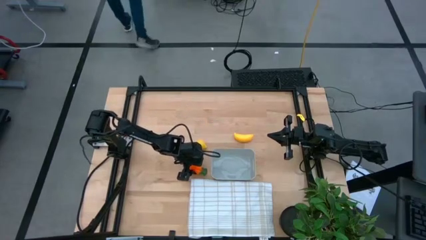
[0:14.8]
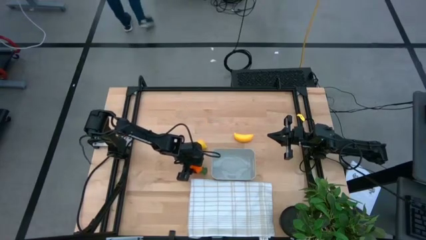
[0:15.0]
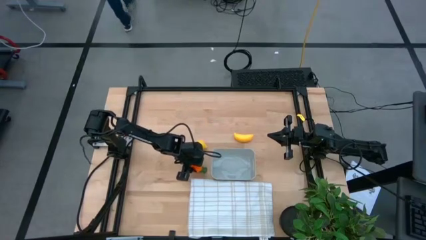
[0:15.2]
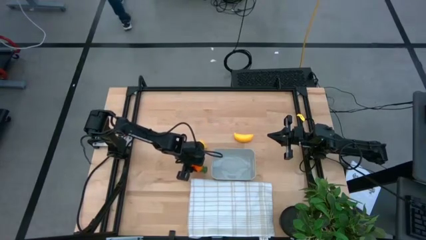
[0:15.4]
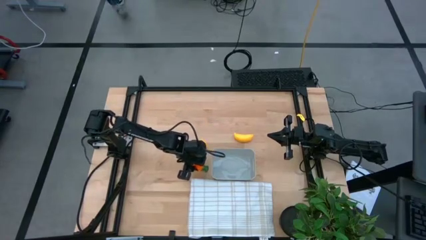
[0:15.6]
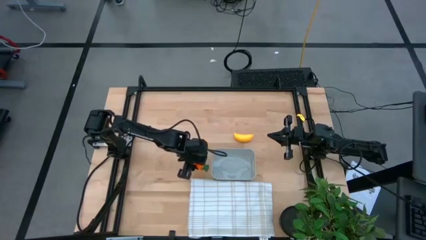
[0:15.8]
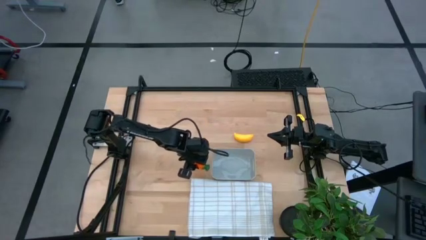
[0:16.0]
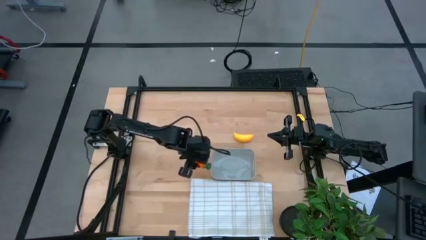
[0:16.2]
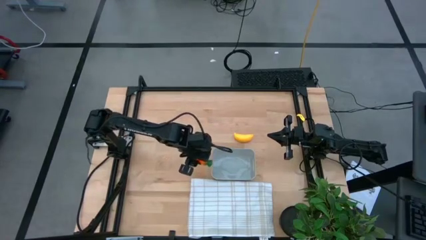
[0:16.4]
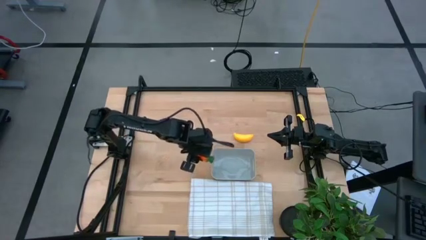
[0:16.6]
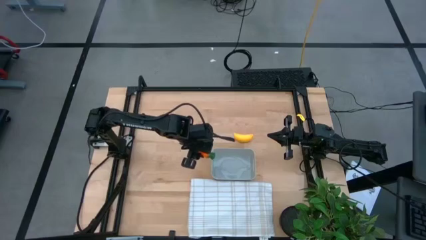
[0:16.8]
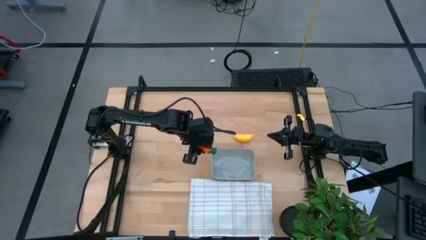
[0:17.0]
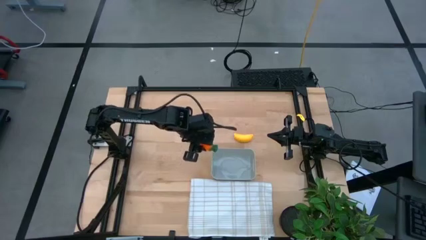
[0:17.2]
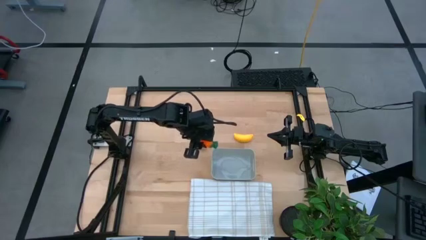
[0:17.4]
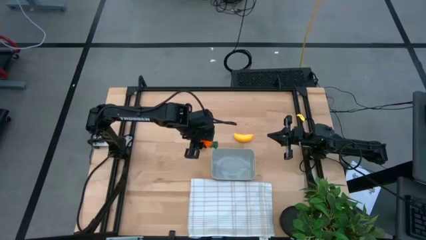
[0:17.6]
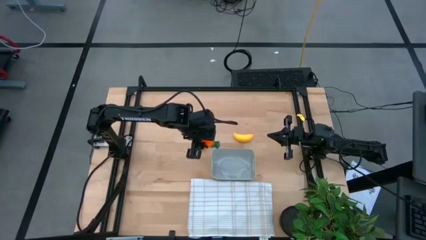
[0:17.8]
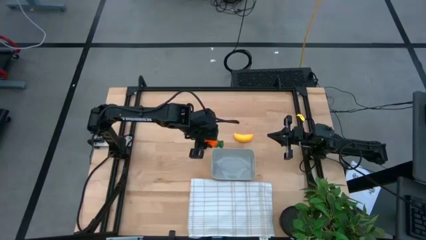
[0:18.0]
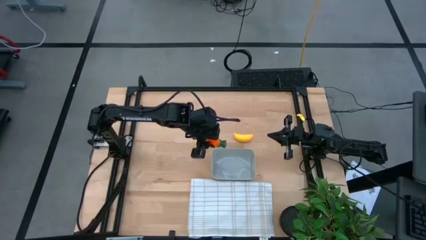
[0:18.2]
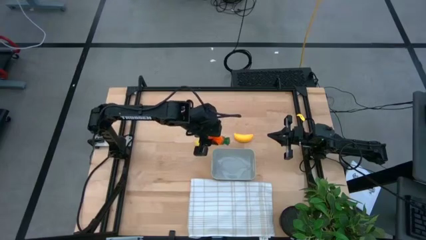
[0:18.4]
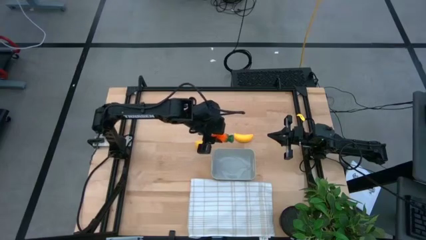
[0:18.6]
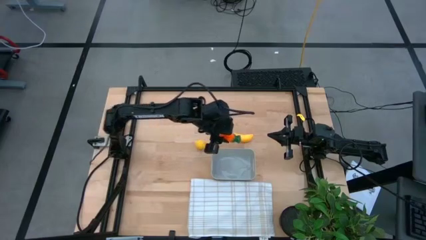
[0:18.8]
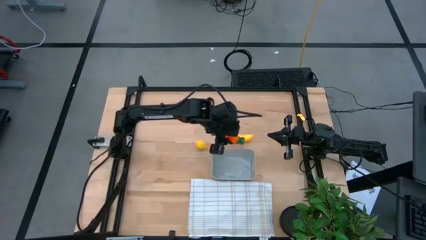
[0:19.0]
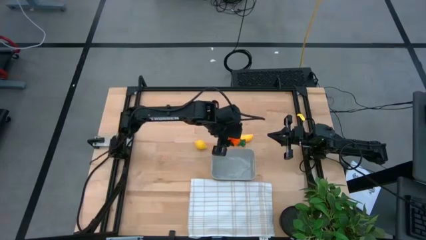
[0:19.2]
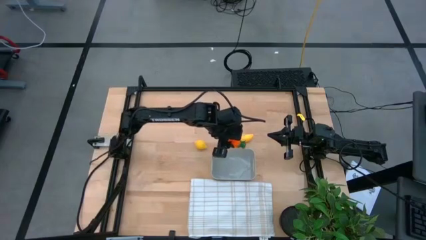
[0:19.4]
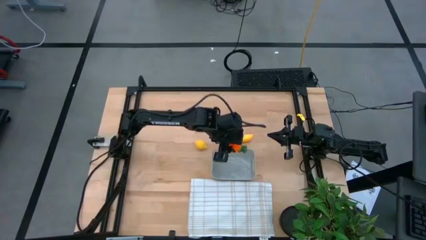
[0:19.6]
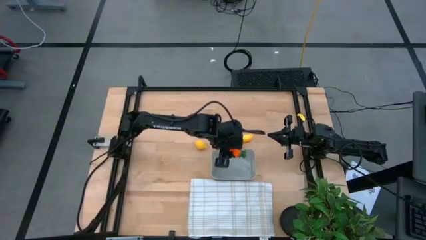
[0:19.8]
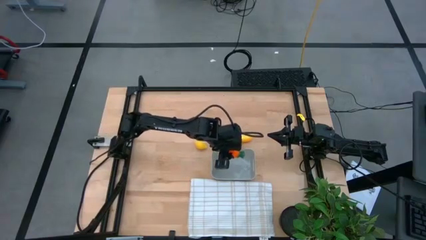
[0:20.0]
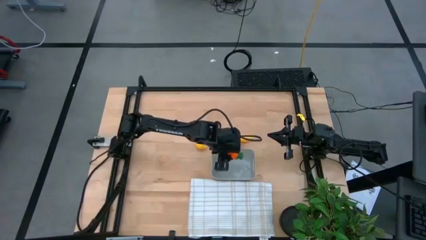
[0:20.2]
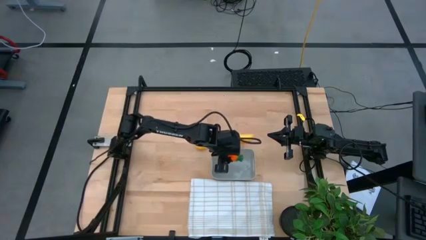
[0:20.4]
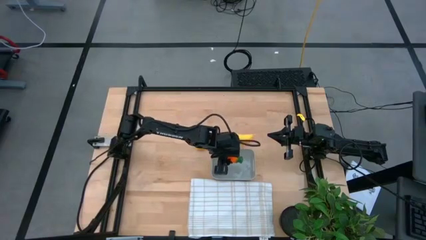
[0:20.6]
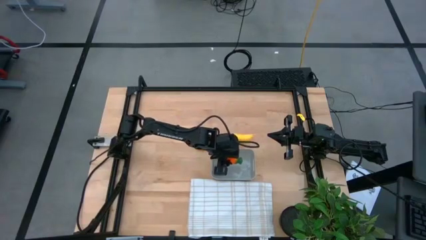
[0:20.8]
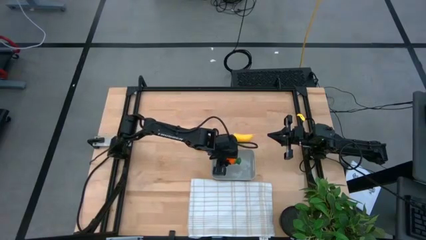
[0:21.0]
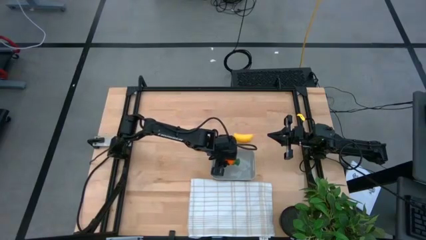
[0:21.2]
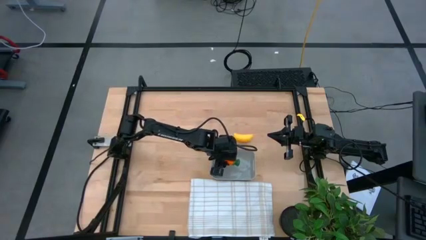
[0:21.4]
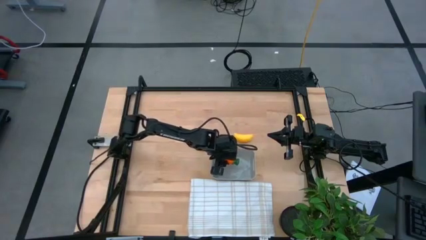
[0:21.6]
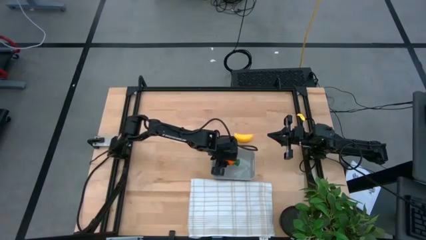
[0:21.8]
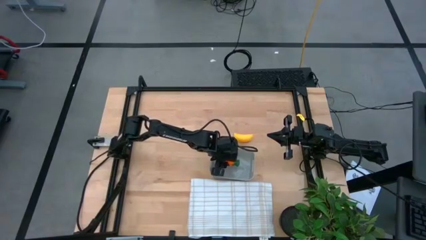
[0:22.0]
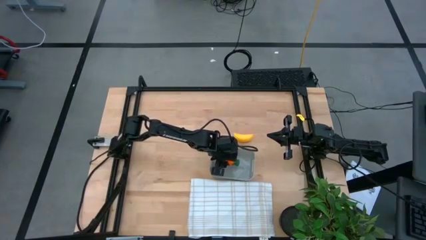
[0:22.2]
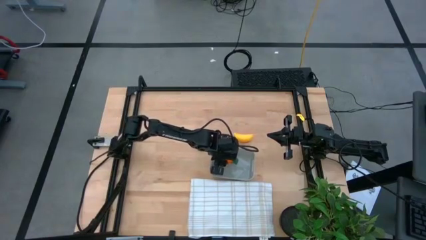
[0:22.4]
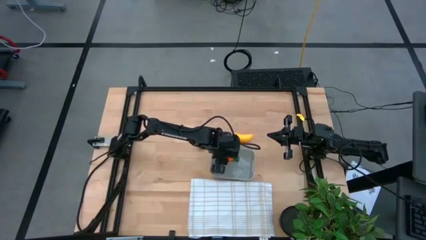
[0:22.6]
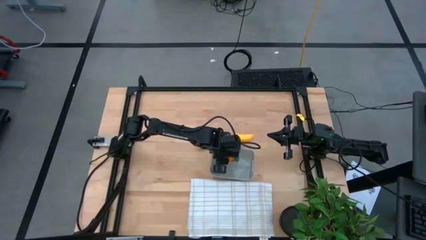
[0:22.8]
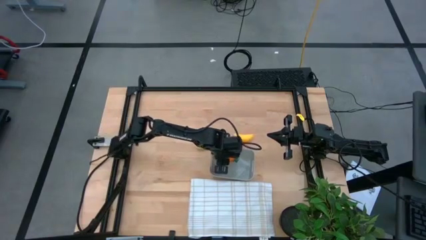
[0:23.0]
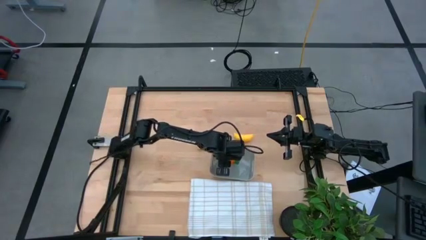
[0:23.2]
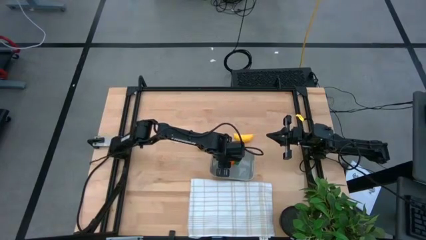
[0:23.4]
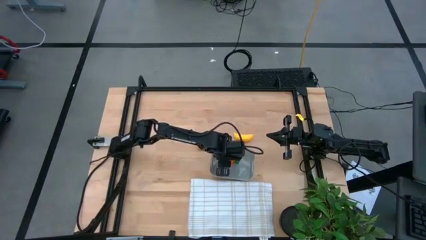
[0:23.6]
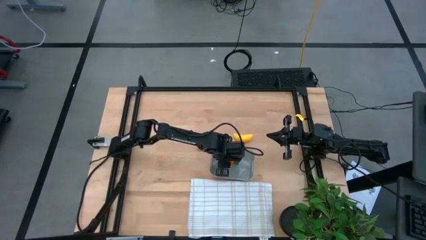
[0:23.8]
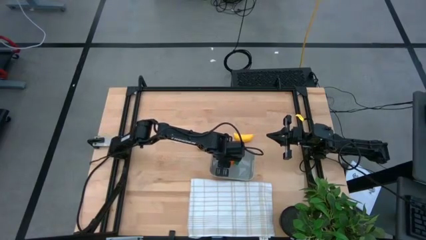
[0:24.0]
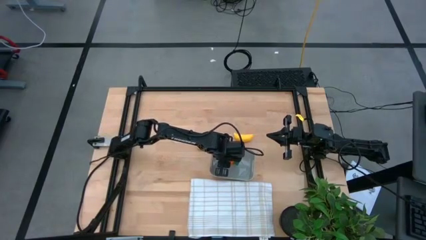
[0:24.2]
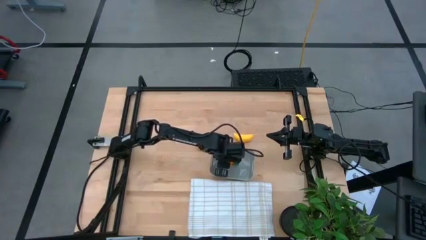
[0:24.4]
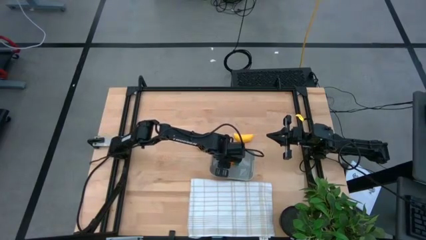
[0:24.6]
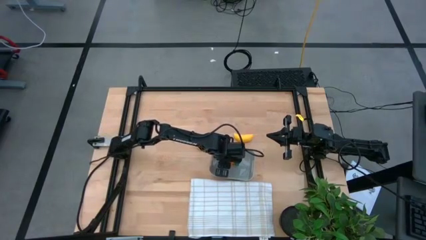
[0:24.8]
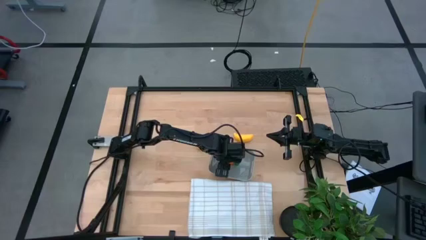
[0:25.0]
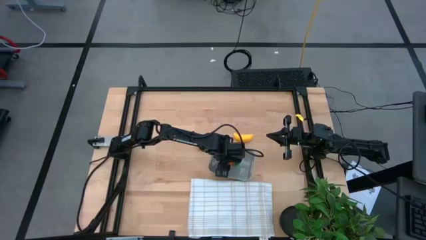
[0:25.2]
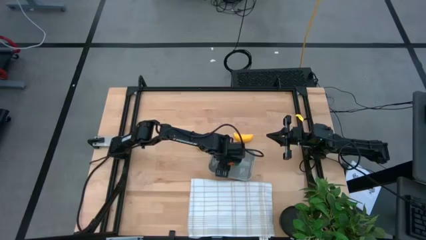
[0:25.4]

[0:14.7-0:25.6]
Task: Pick and placing Produce into tupperware
Put the carrot into the gray bin

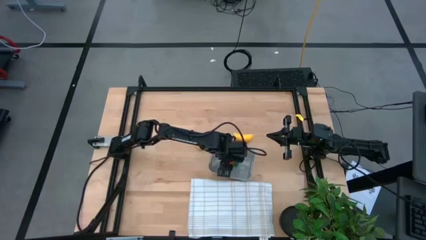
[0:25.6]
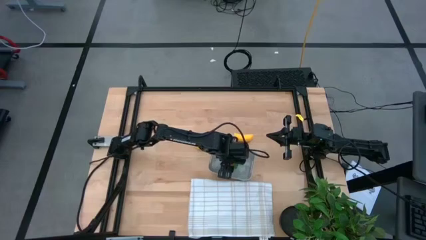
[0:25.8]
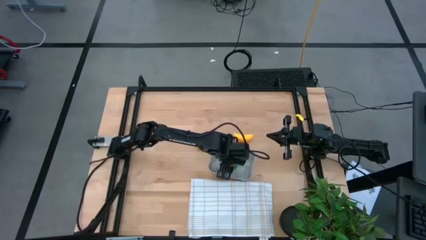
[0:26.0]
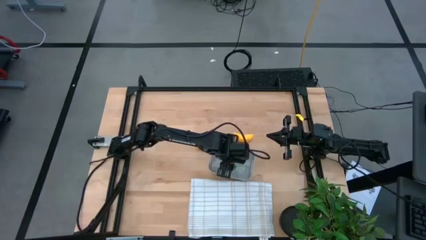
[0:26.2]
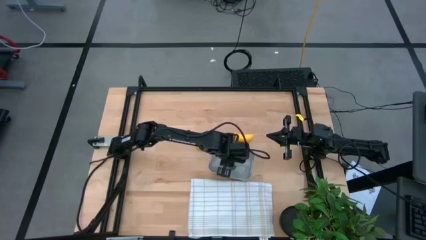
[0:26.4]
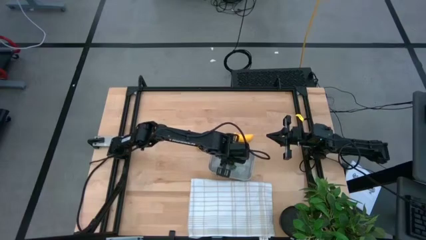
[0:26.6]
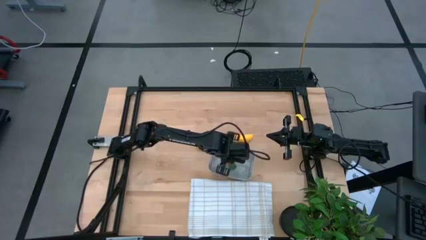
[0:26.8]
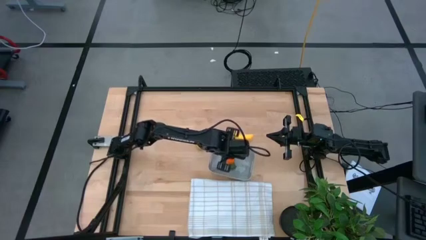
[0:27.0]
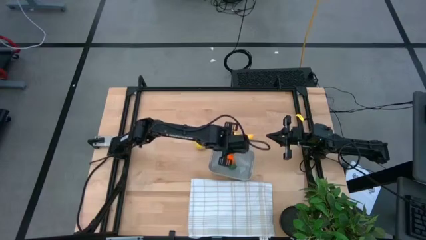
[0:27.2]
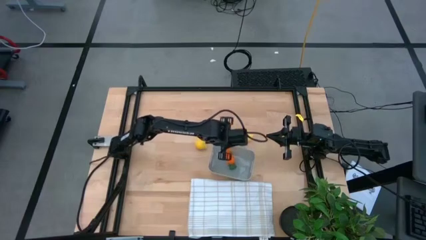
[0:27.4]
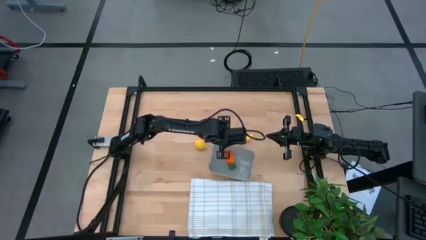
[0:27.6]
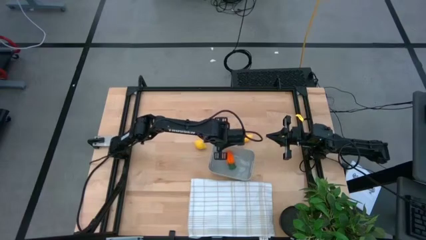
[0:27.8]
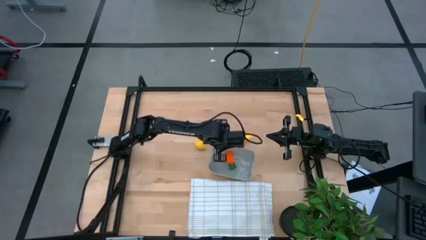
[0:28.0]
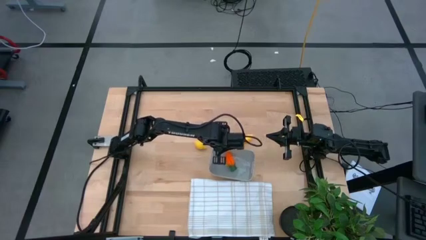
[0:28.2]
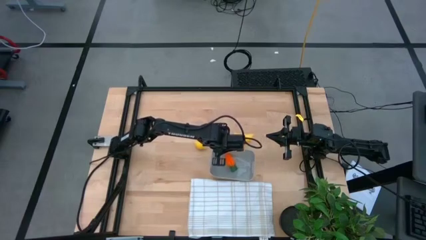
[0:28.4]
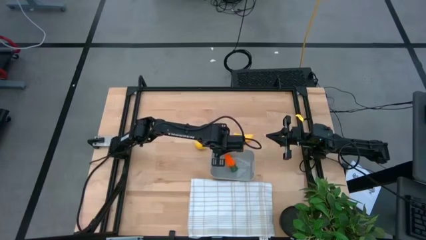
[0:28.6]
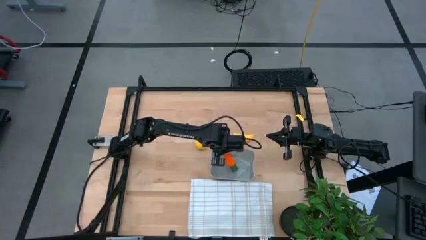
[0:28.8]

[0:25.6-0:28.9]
Adjust the gray bin
